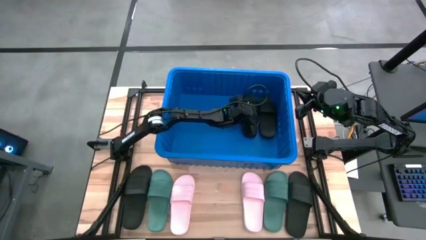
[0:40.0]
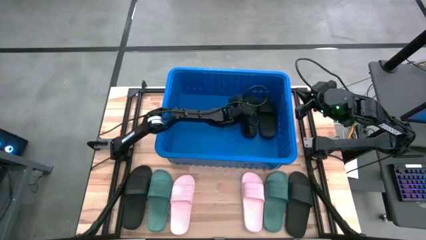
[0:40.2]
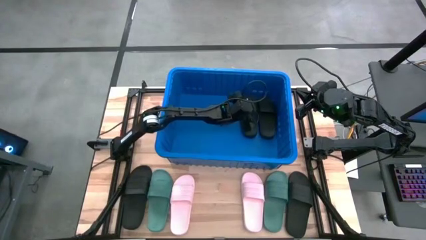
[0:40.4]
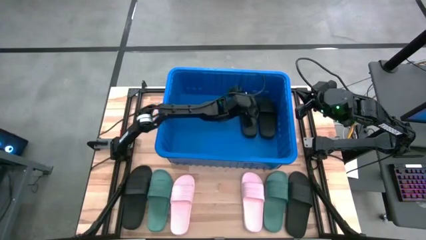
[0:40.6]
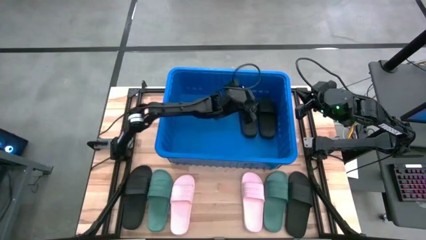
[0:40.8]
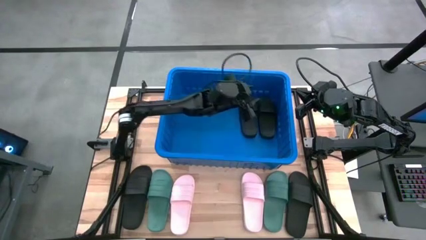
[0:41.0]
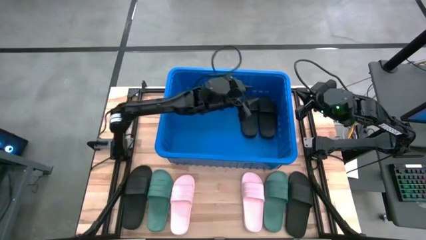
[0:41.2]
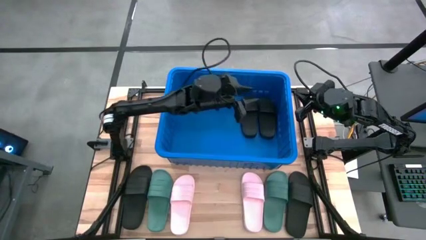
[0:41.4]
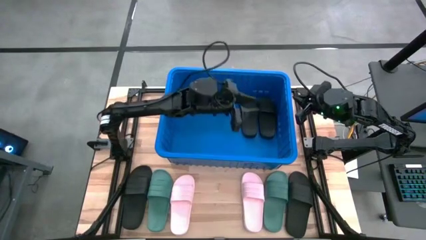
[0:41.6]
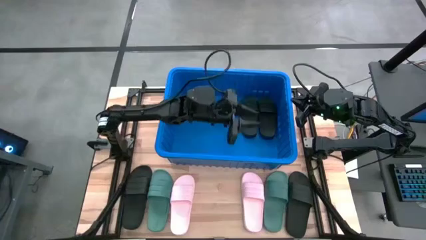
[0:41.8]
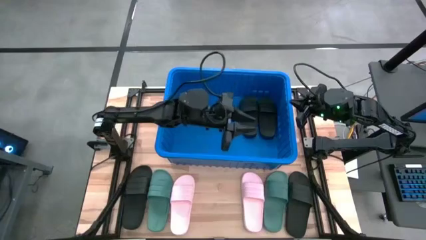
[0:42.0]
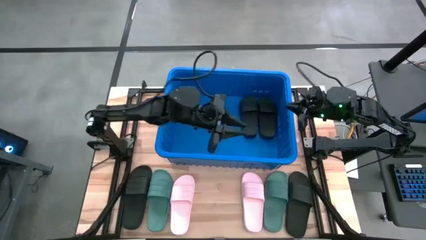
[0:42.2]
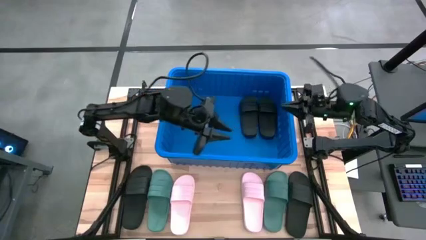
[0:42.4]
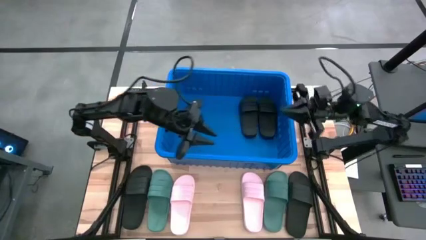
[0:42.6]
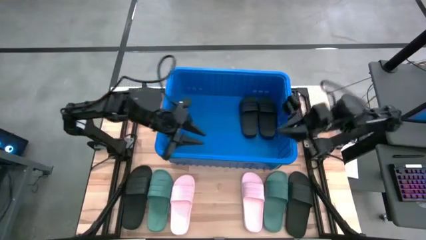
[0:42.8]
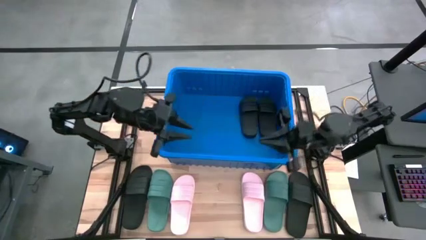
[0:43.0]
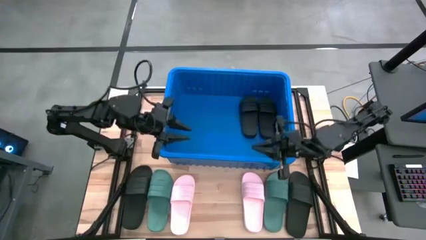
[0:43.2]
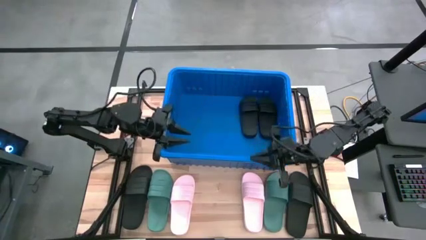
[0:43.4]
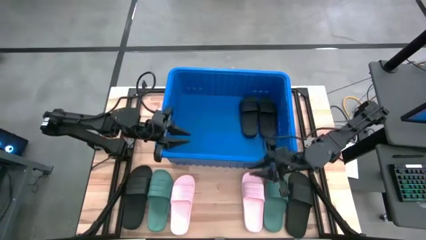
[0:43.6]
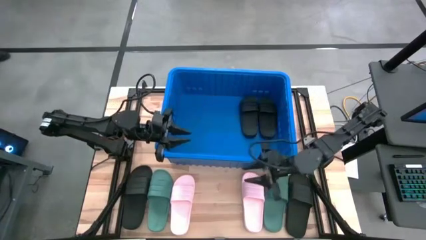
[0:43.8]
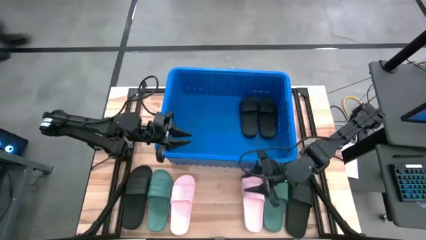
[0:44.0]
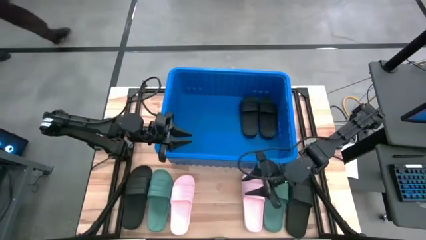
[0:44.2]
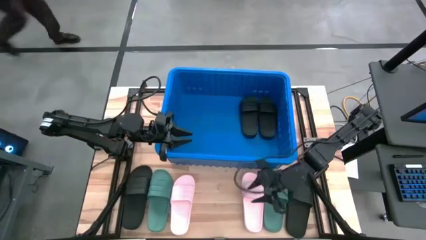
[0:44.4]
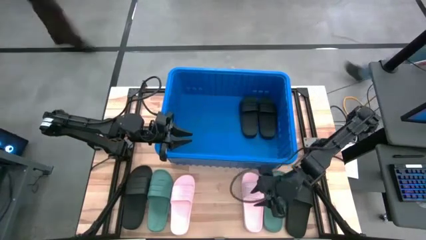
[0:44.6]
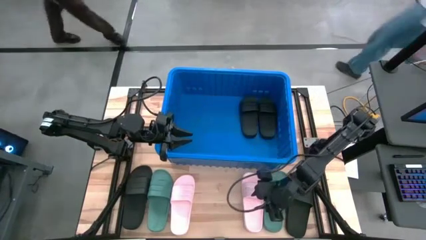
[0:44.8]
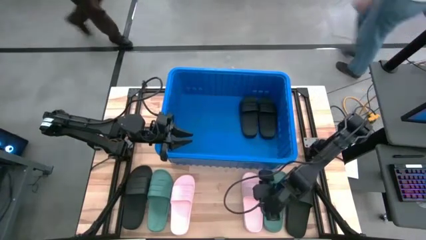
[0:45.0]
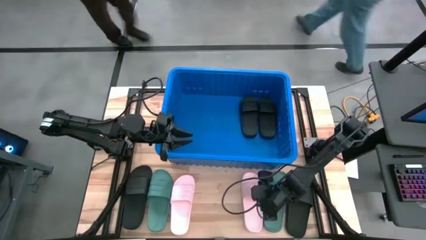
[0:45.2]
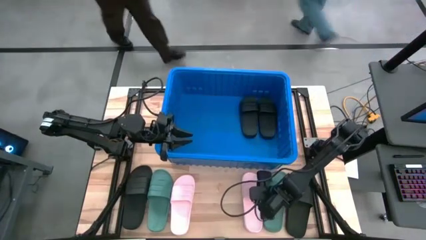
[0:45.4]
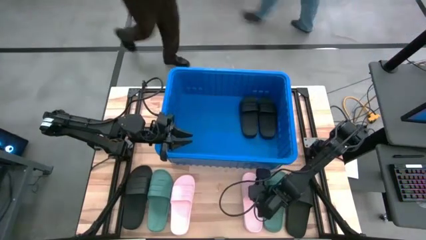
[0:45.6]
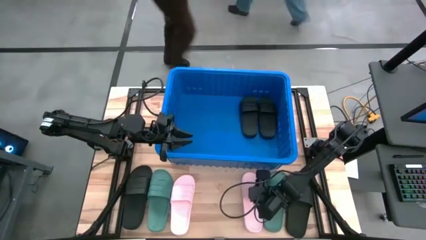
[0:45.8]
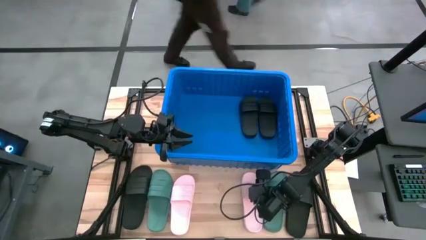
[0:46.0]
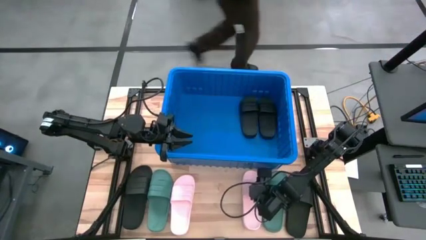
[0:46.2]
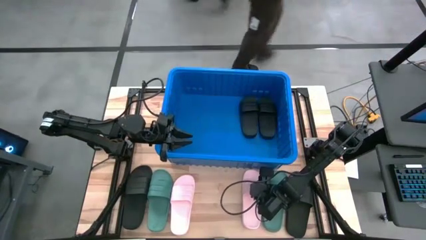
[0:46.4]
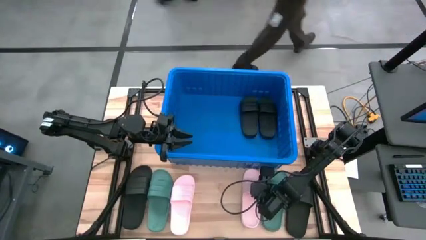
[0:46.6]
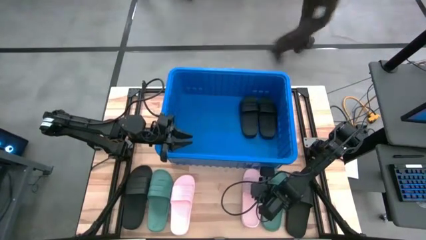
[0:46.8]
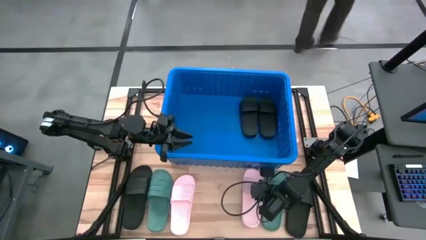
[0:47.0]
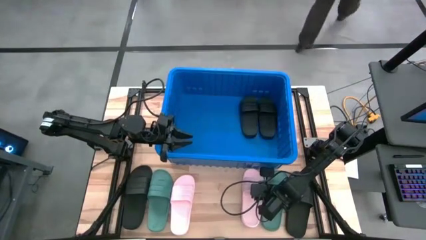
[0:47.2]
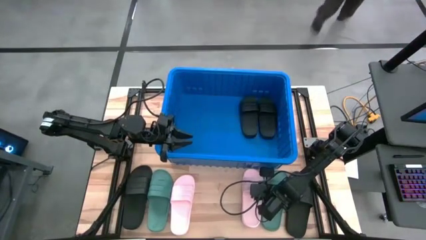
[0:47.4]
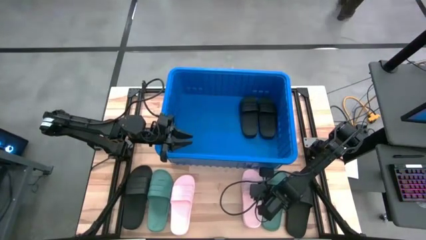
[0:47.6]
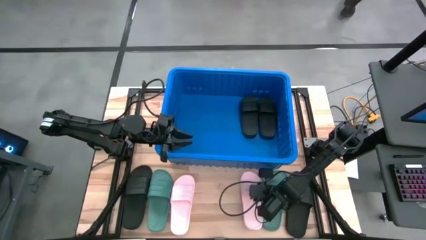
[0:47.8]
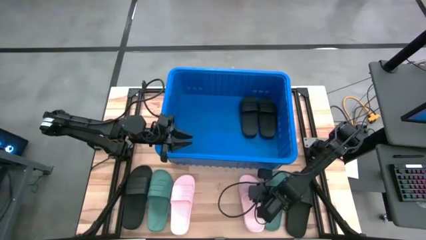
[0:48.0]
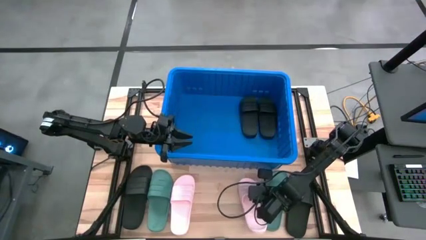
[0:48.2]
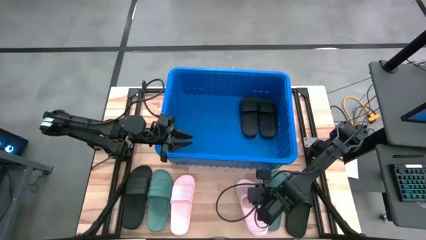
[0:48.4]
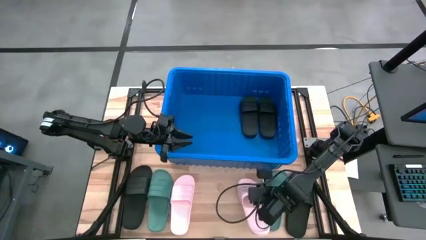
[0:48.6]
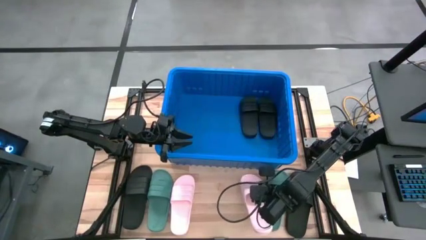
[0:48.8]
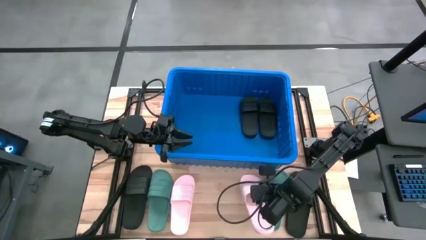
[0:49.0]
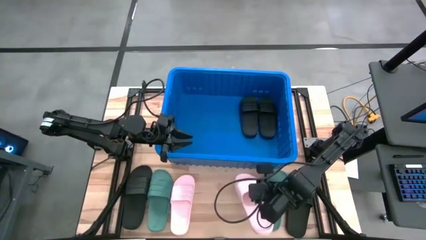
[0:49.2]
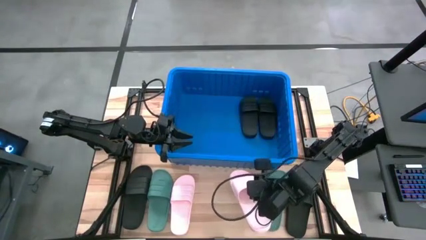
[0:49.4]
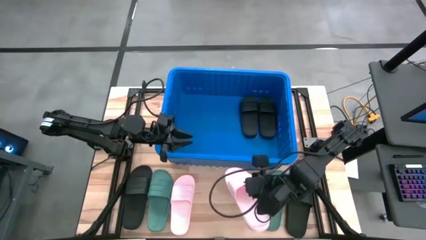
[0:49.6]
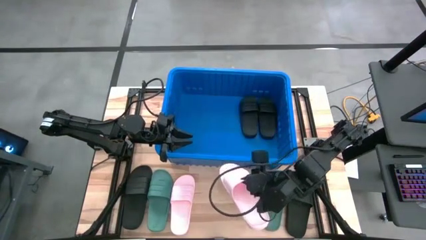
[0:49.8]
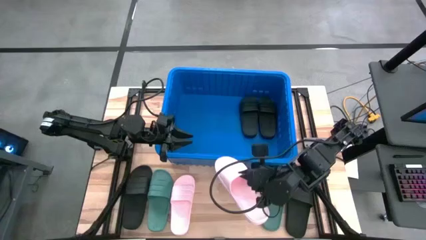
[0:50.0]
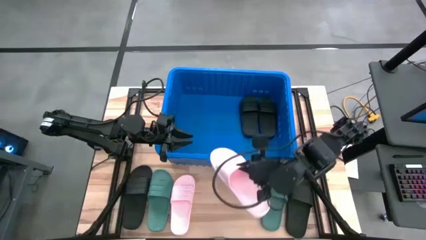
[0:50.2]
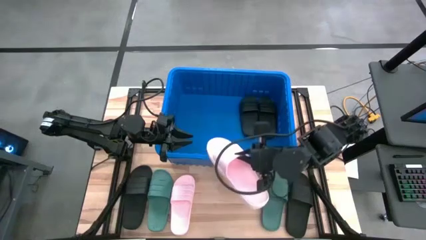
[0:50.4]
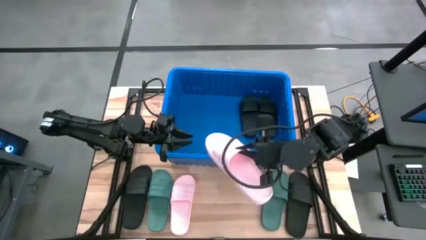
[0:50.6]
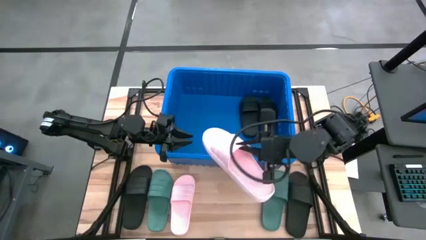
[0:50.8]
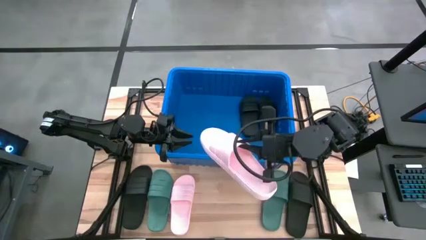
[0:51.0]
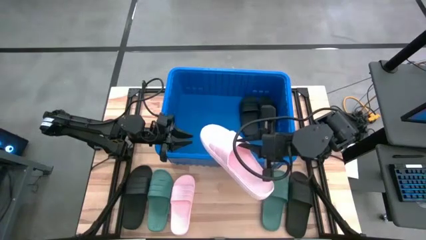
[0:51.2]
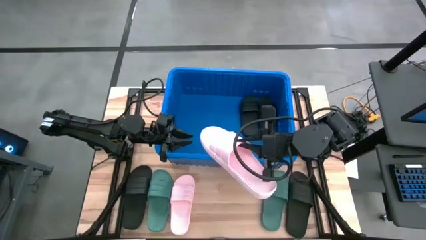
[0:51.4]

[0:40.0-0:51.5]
Task: Pick and place slides into bin
Put the right pink slide into the blue bin
